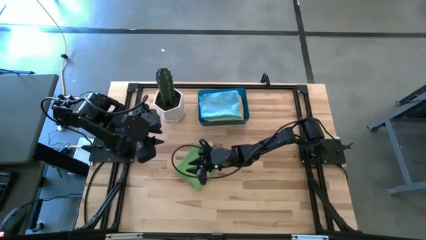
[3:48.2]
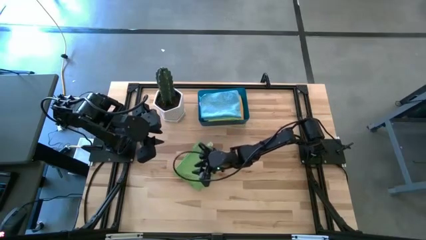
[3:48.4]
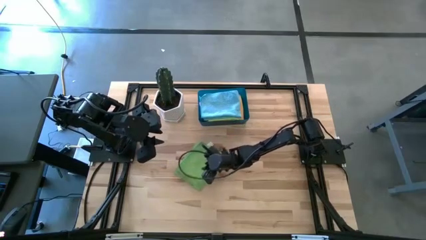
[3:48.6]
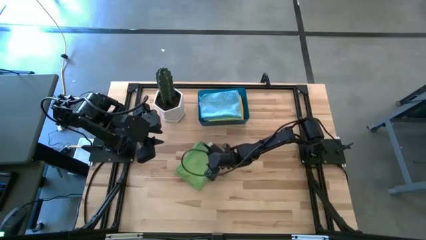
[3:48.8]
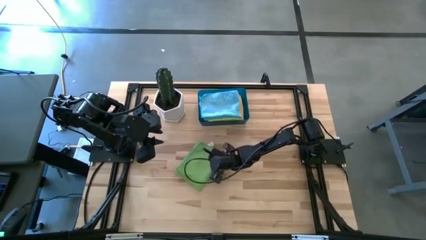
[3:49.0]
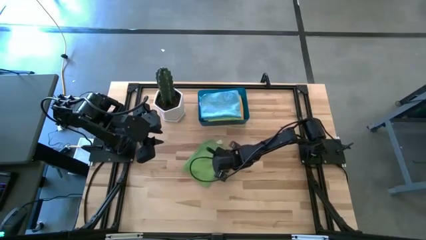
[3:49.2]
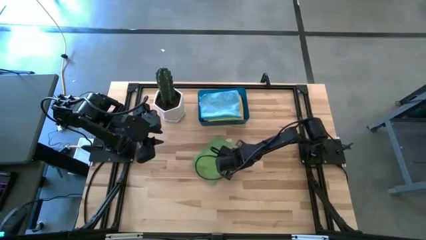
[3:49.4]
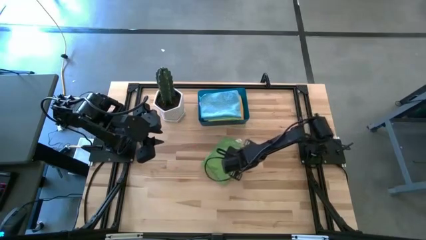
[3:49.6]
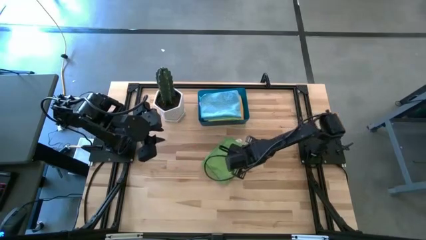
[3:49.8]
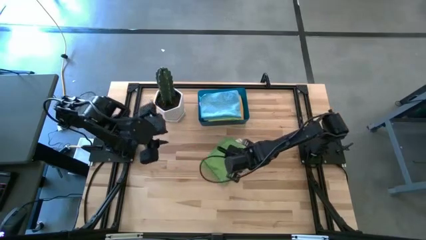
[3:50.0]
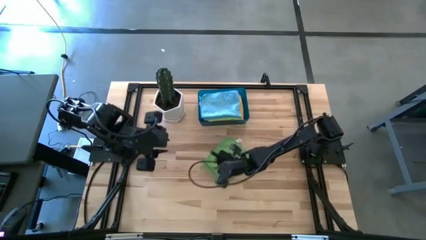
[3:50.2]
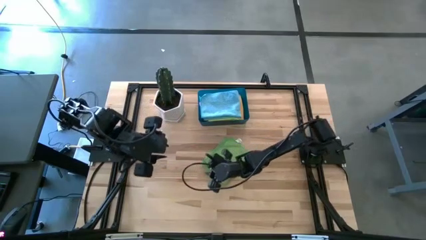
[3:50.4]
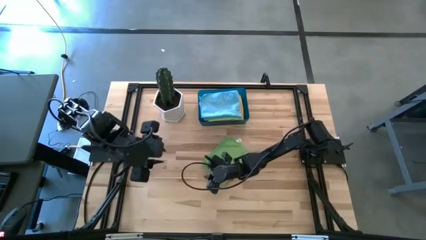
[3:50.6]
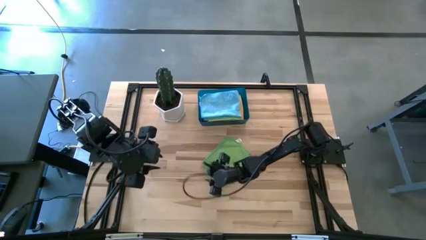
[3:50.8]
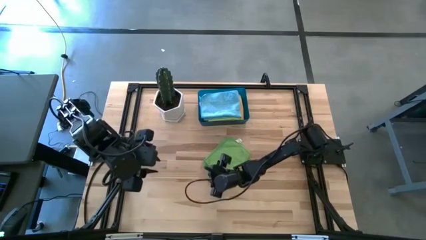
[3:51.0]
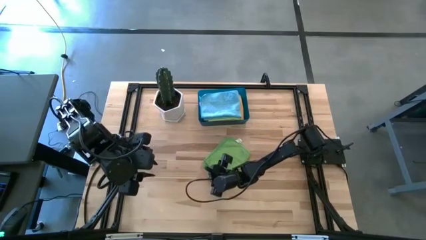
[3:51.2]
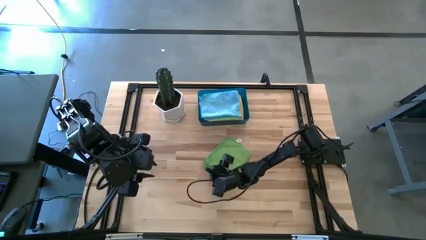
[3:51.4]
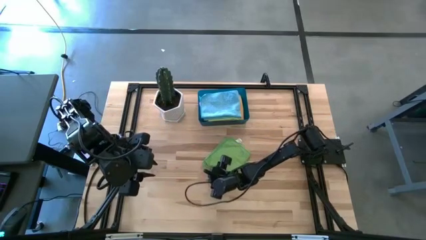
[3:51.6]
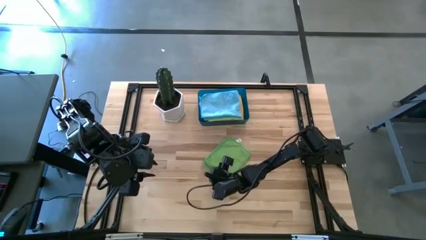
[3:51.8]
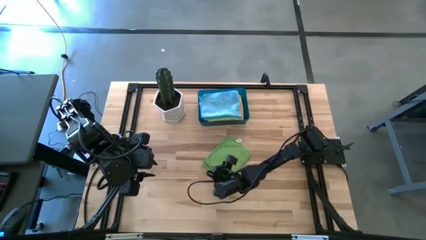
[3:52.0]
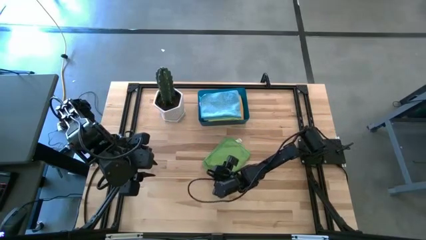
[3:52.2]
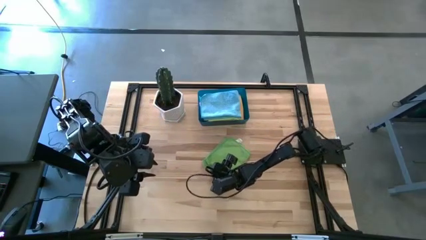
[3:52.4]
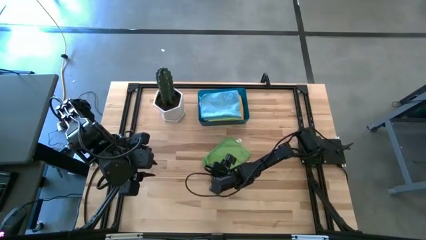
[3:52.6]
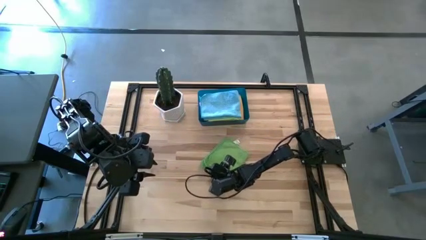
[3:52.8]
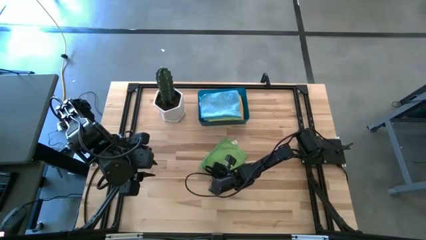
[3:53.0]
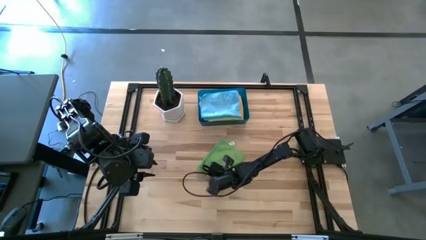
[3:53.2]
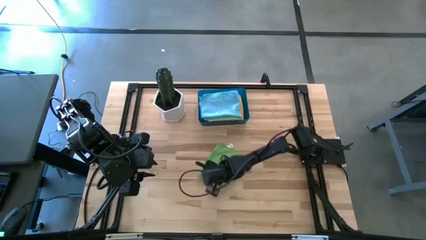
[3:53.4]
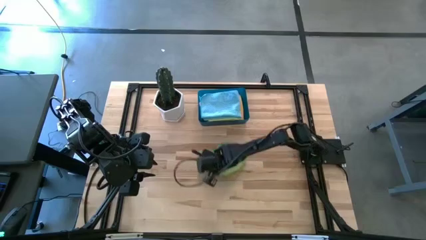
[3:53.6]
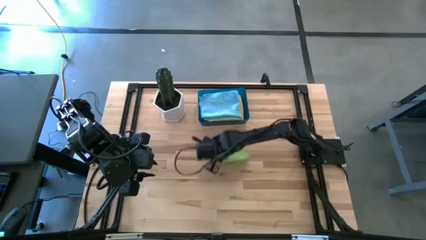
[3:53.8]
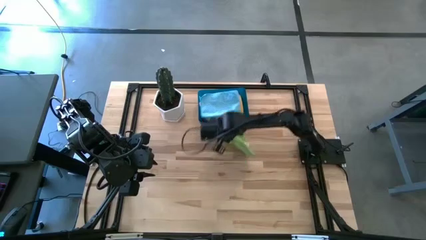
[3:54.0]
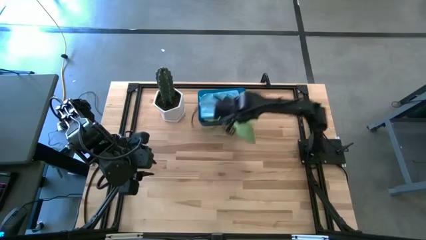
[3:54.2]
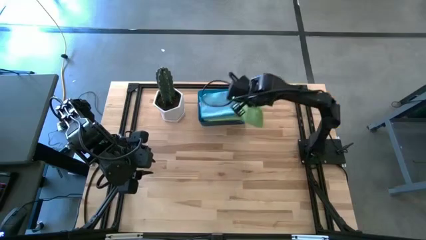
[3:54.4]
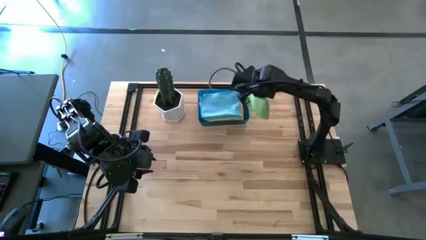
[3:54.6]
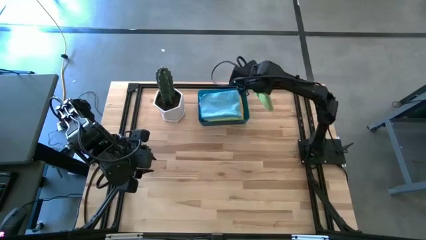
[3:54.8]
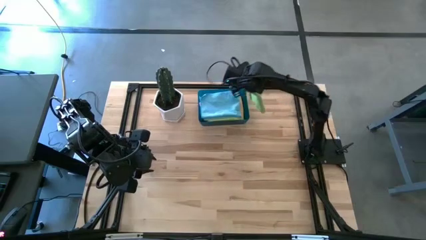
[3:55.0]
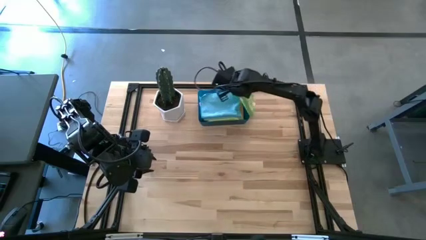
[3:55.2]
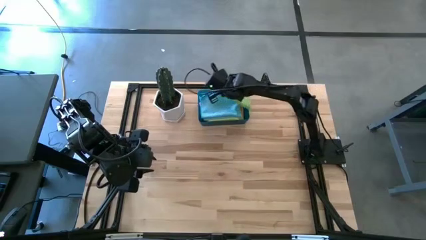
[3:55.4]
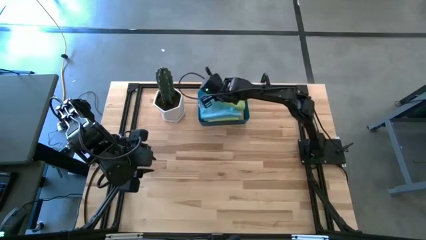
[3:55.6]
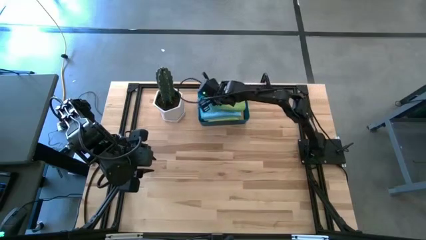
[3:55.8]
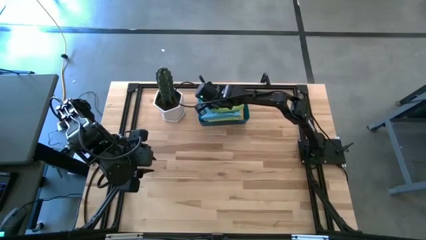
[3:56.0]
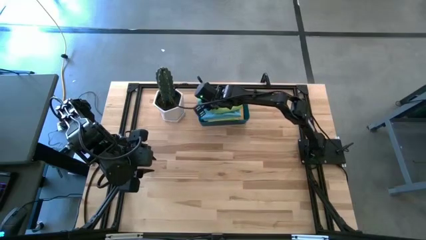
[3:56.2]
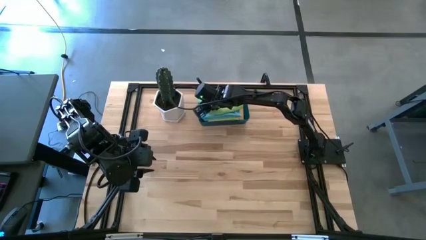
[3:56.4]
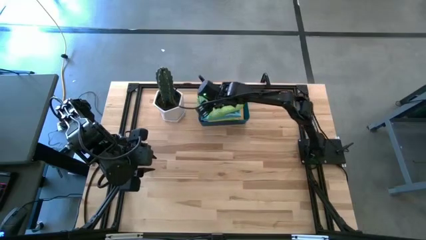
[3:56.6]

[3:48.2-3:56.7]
Task: Fold microfiber towels
Stack the green microfiber towel on top of the blue microfiber towel

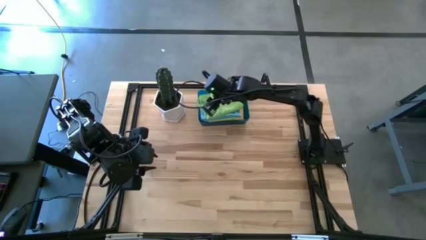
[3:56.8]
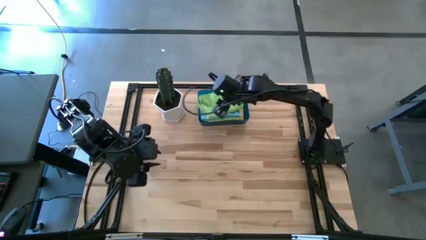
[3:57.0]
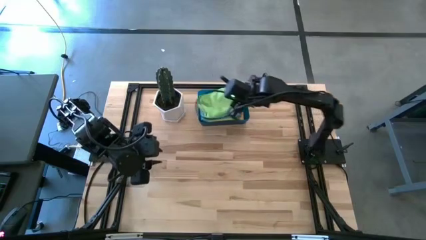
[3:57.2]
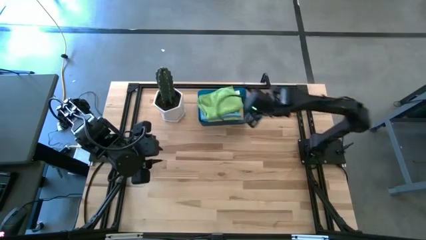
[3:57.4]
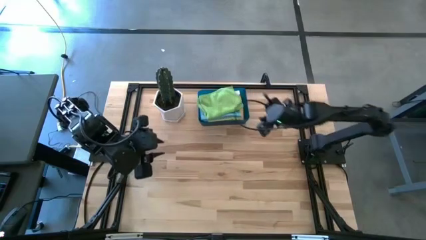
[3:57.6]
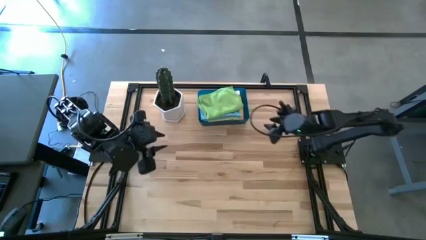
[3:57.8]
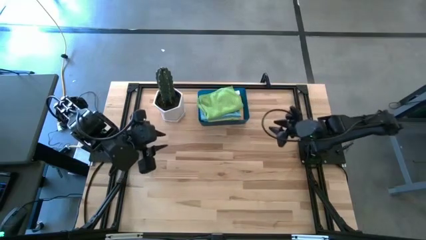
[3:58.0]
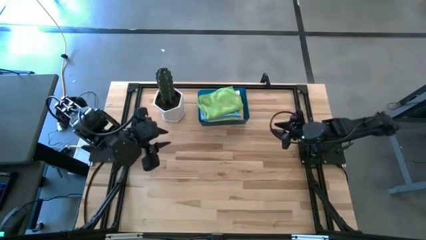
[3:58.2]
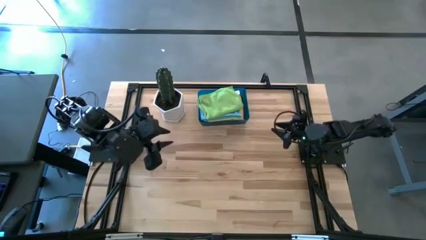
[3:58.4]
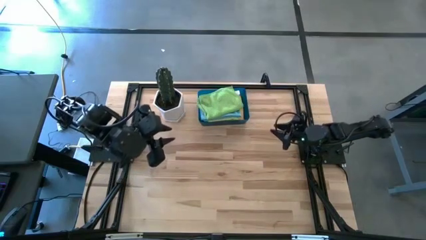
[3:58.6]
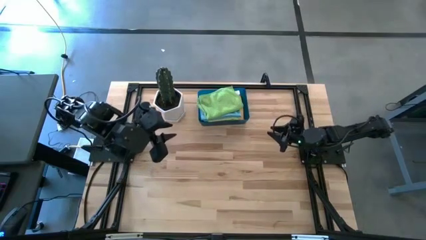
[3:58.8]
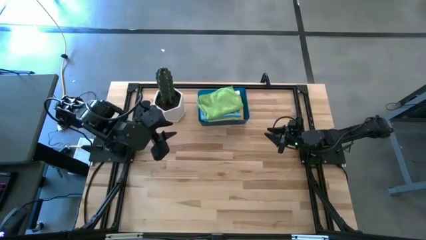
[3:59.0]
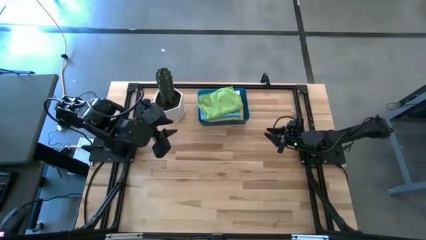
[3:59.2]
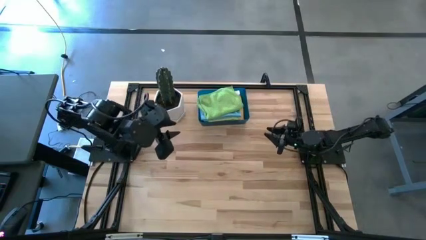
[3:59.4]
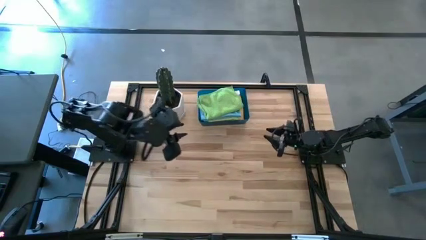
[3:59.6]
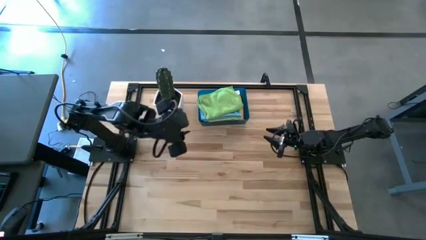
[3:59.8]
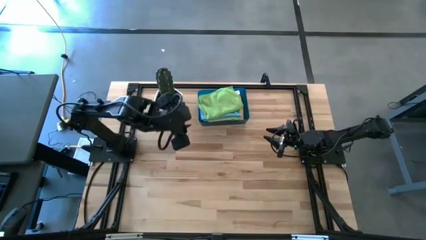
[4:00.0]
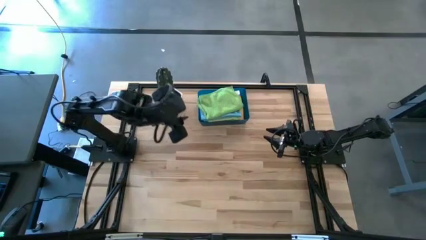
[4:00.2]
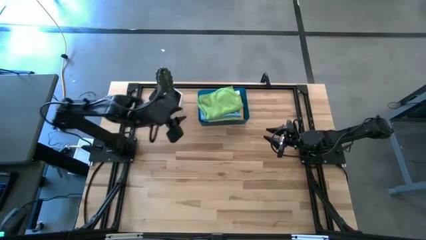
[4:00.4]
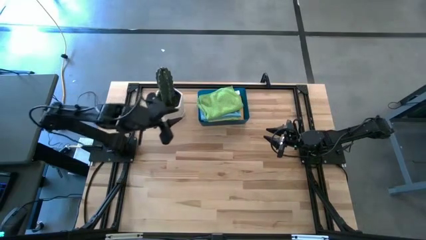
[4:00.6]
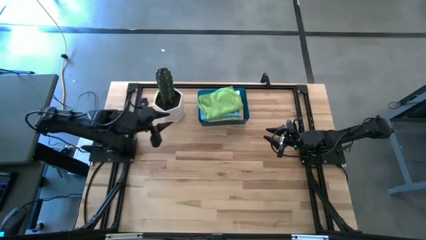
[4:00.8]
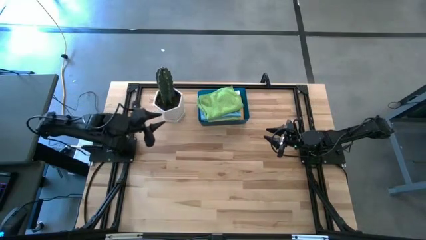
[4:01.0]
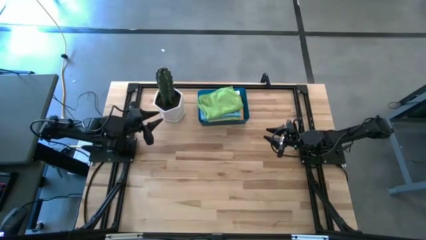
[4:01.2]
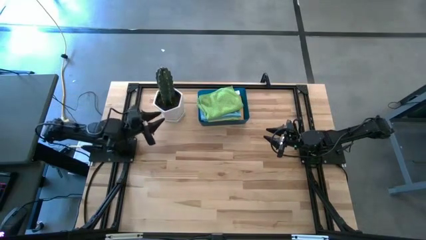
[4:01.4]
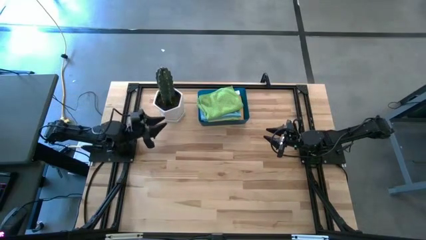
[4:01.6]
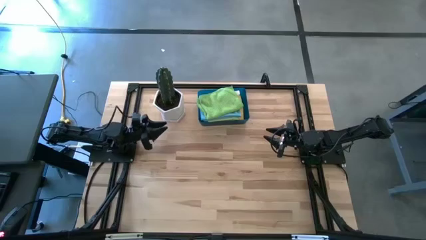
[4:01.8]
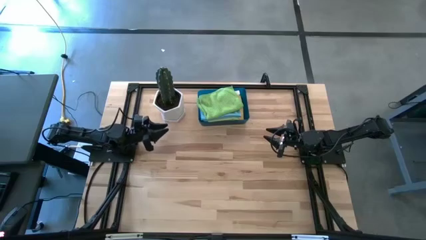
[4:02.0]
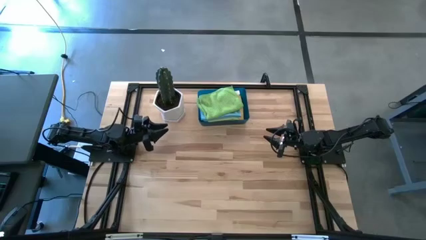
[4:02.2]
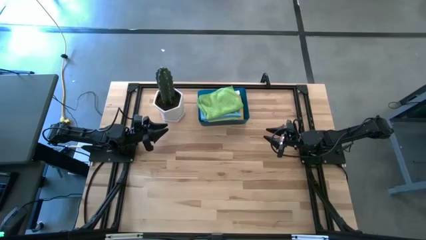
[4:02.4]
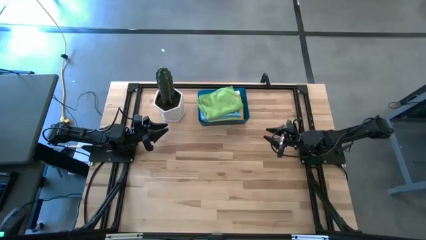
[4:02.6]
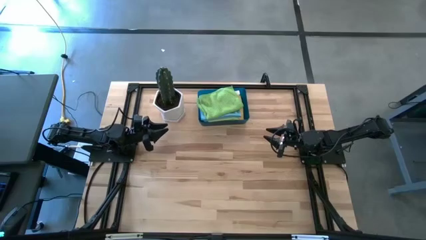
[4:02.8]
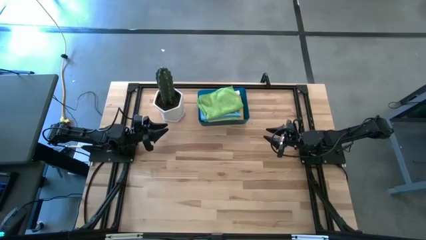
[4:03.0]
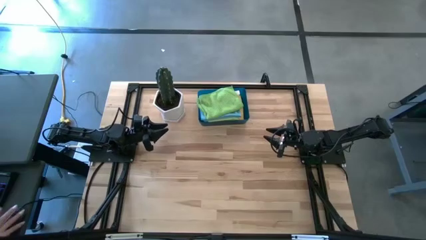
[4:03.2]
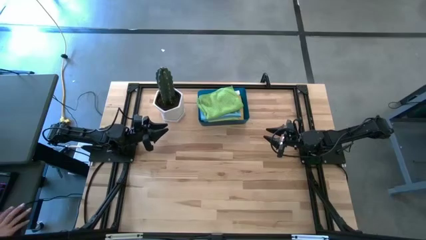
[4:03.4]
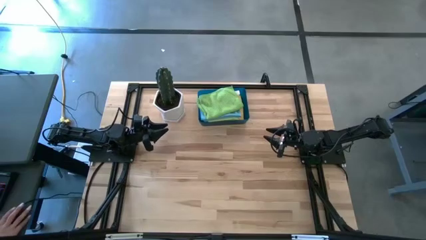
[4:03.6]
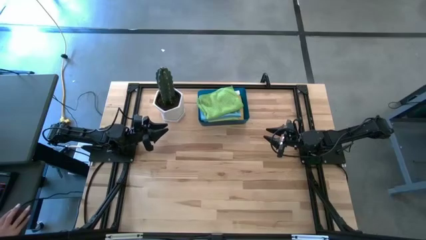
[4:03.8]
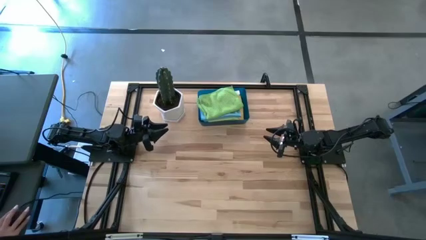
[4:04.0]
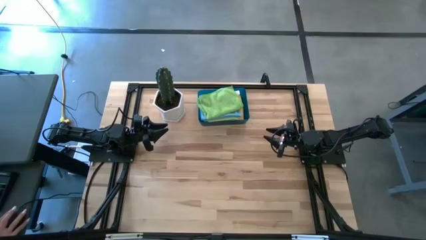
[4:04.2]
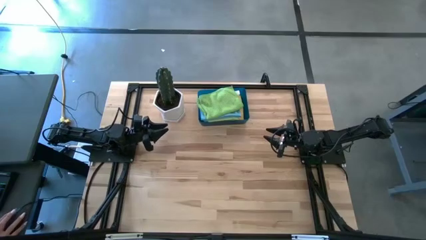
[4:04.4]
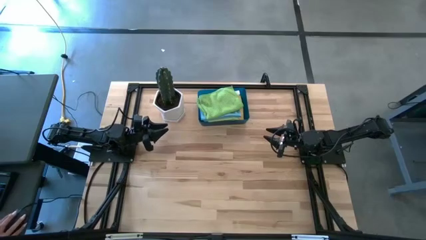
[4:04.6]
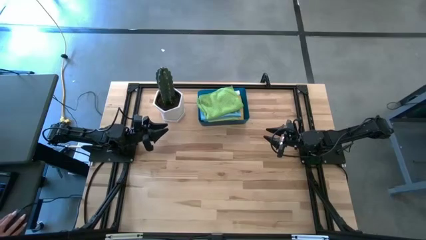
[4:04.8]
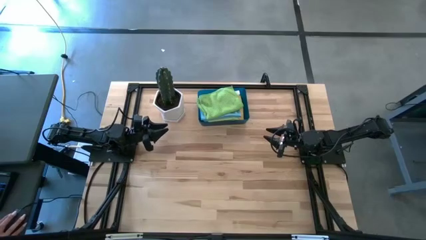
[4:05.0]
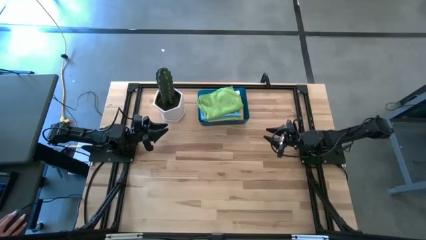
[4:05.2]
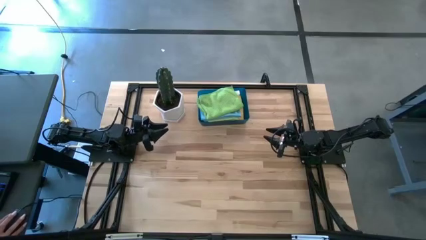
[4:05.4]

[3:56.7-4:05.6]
Return to Home Position
